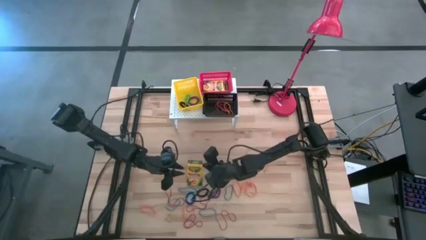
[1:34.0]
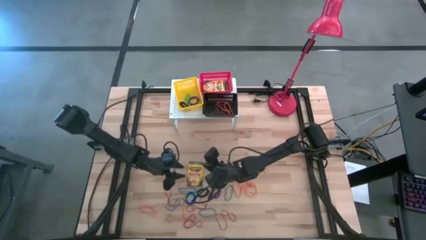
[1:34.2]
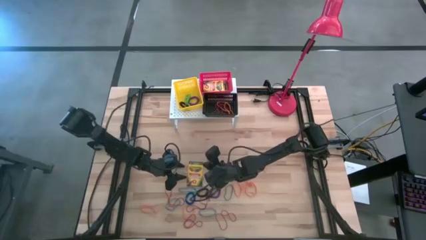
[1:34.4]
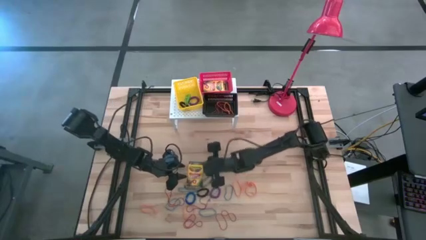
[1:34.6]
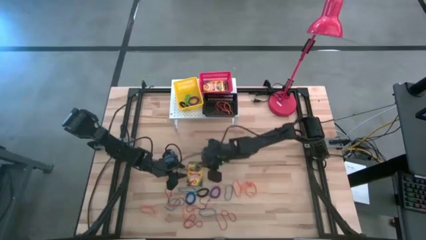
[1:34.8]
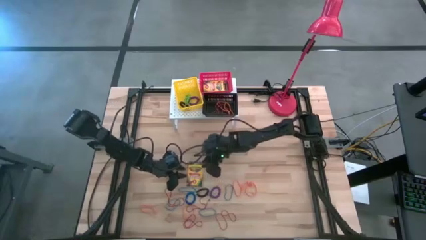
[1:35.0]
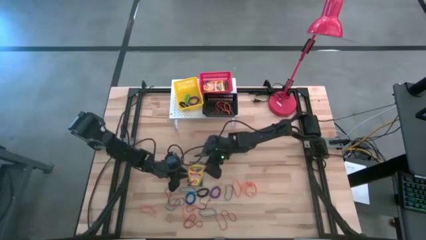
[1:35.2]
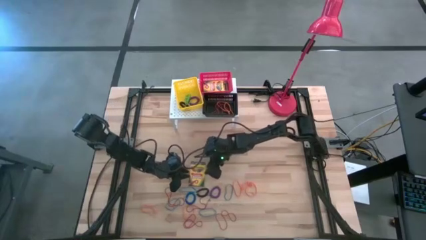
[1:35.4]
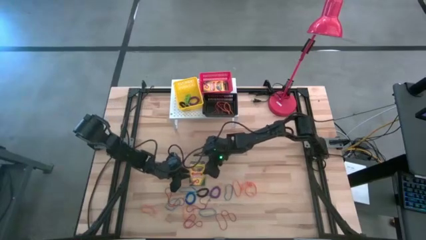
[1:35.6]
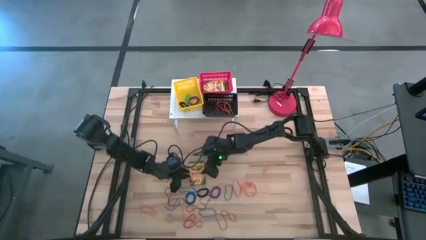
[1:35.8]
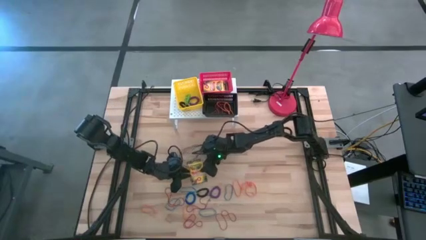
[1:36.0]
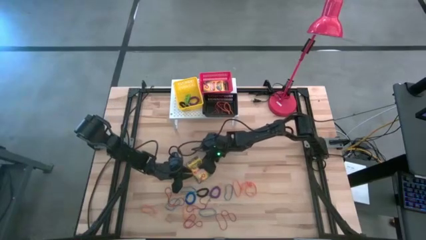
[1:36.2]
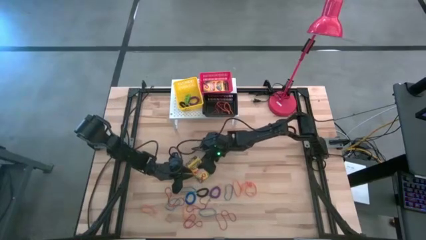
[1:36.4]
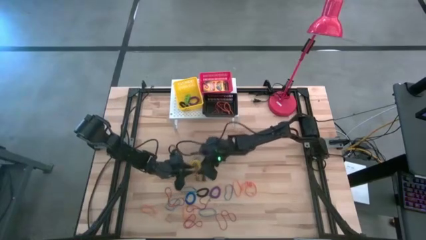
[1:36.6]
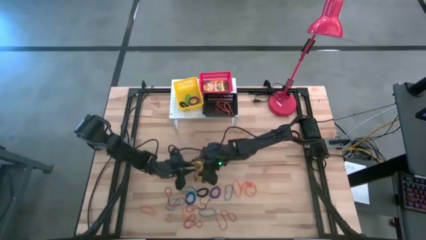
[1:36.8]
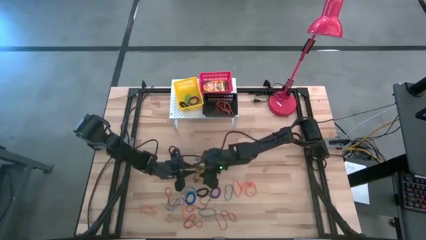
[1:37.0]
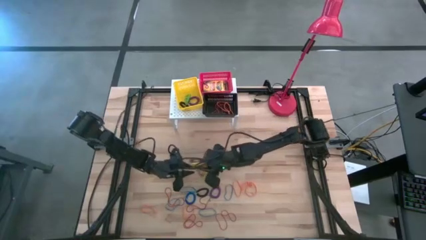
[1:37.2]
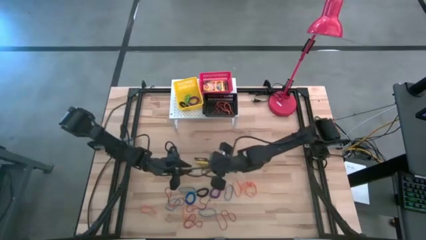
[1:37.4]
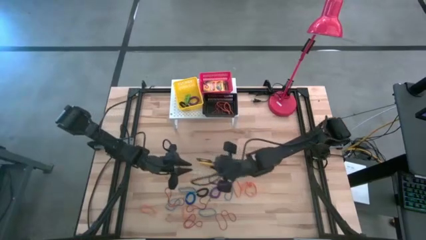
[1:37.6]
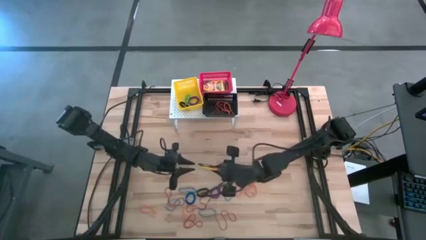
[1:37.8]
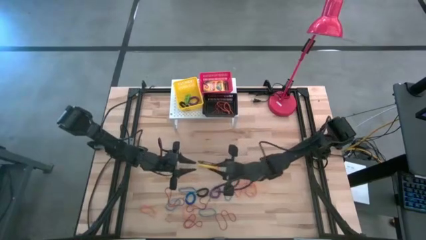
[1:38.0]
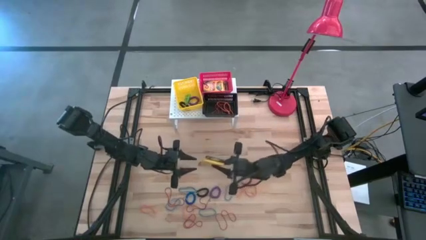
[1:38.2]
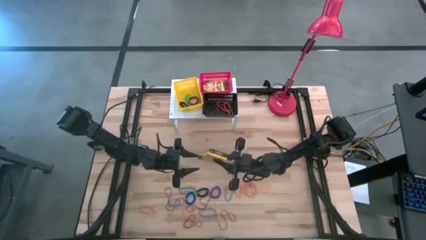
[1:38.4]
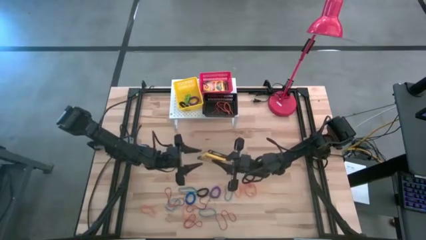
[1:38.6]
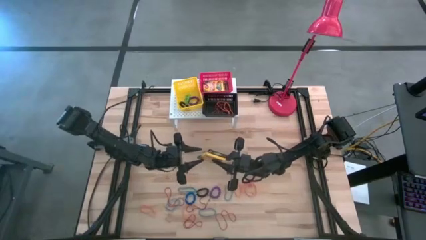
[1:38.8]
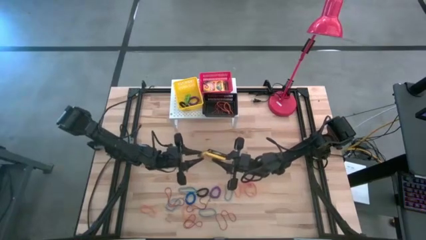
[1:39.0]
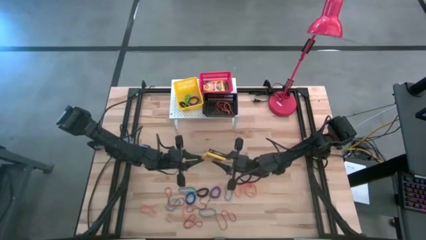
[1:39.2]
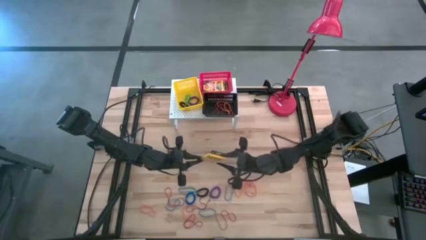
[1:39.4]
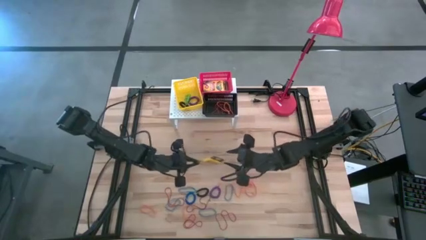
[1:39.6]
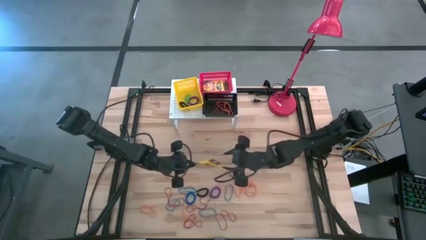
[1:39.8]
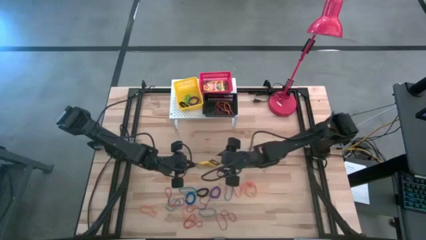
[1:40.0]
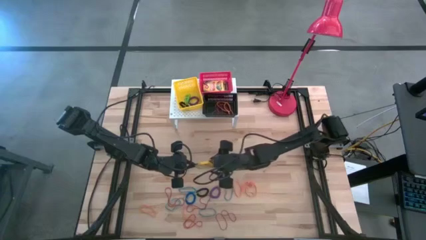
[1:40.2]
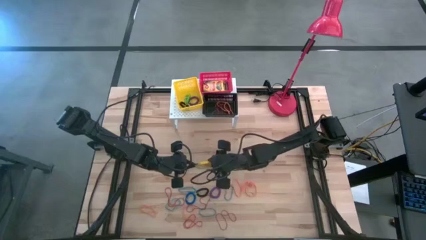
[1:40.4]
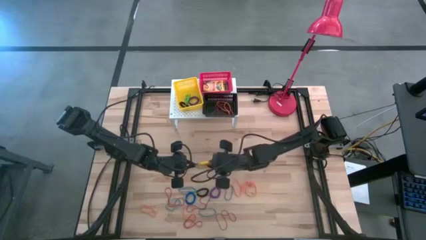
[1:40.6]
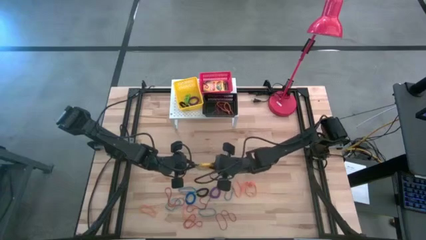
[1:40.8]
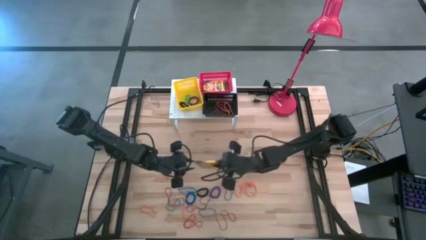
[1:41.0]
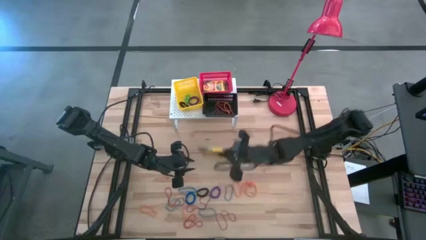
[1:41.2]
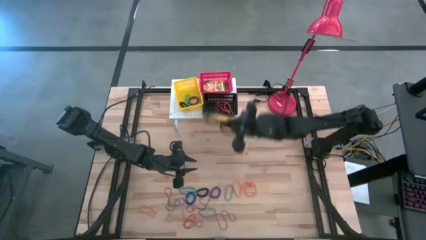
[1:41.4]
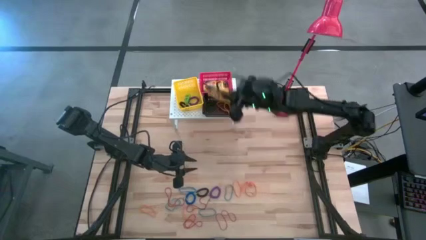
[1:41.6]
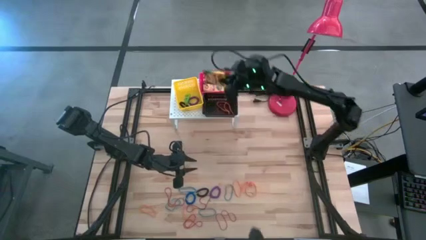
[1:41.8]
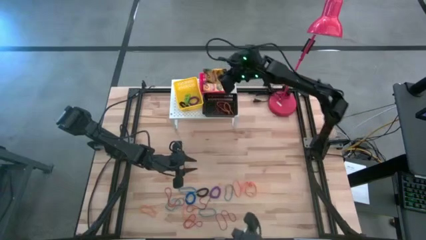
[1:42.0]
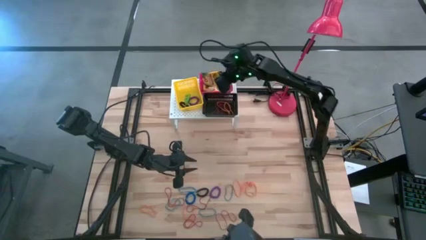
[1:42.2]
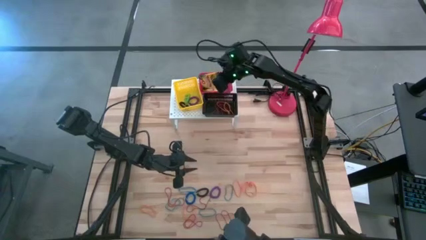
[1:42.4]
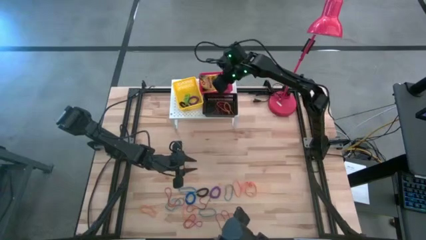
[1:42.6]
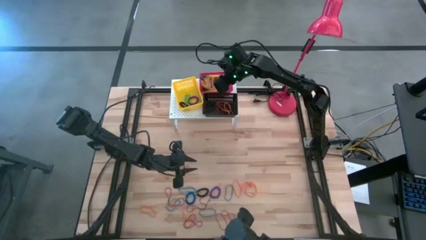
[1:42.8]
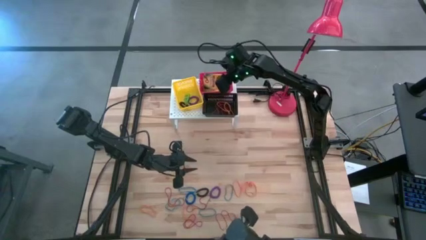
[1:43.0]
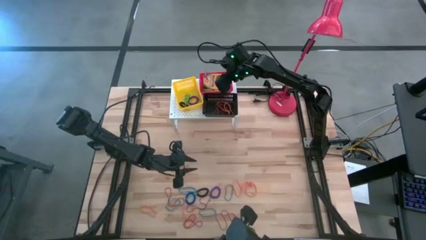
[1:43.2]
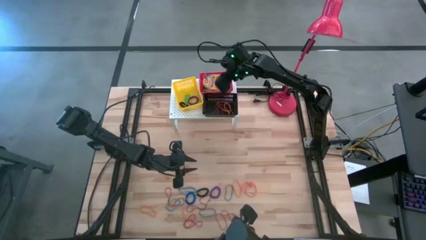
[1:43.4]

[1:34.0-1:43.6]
Task: Pick & Place Office Desk Supplies
Put the yellow crayon box into the red bin on the shelf

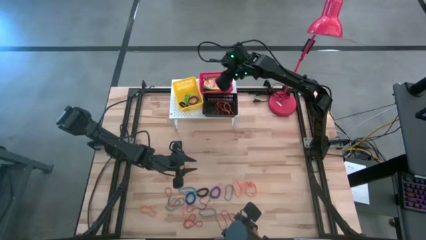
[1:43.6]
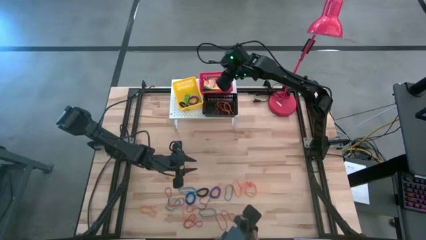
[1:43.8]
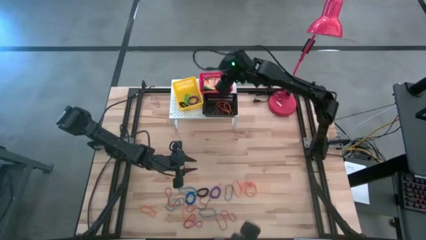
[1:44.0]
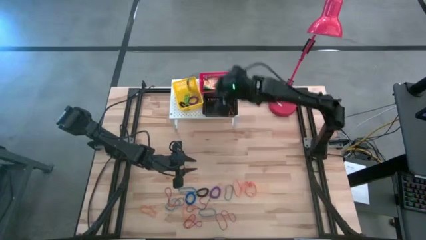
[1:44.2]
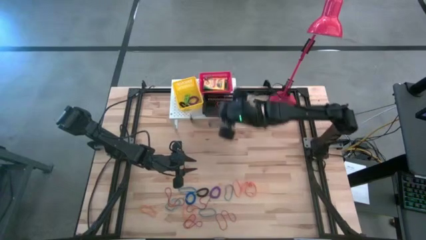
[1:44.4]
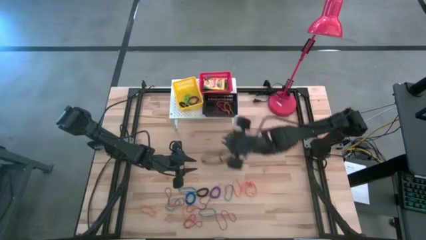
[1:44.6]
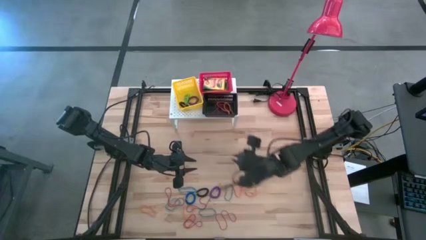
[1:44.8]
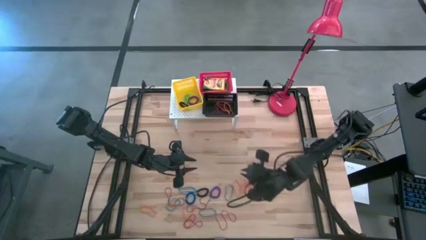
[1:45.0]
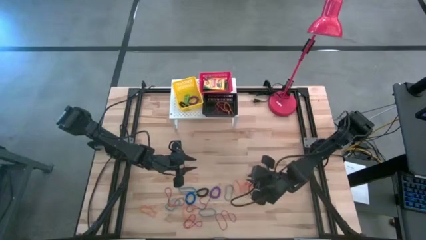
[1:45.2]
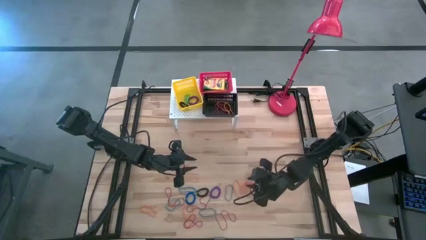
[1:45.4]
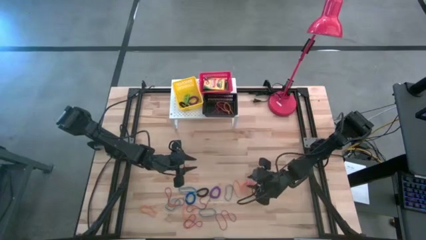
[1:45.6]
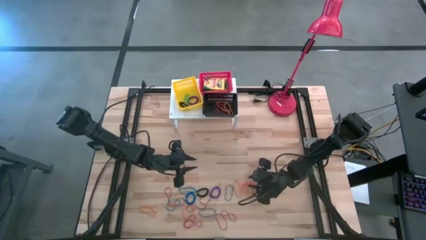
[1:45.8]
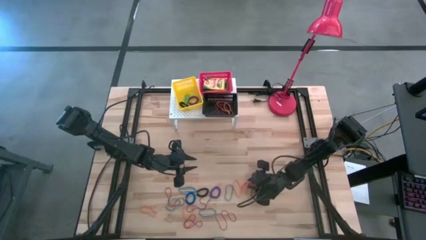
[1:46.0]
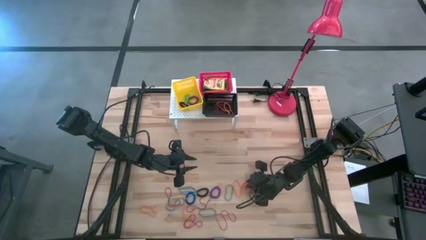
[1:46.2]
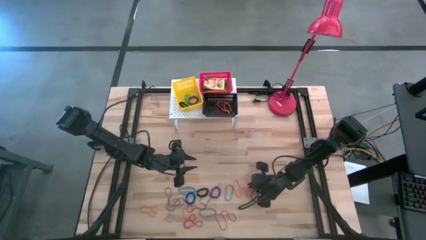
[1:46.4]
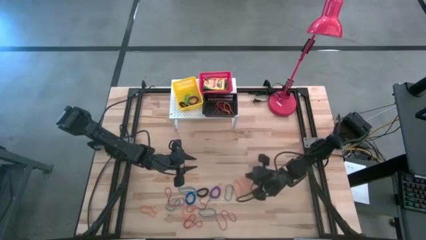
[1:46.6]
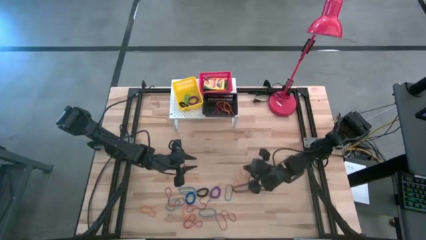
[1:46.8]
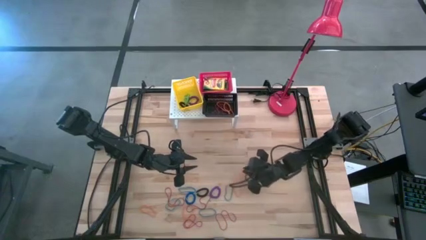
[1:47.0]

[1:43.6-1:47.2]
Put the orange rubber band into the black bin on the shelf

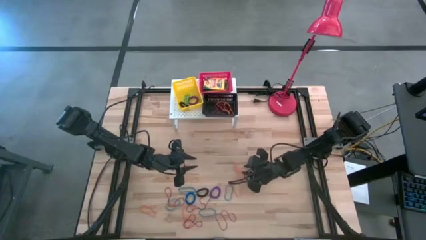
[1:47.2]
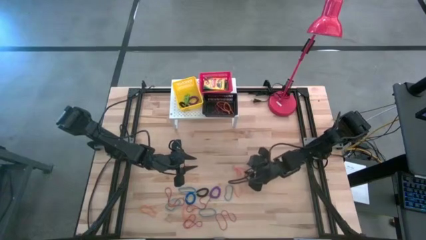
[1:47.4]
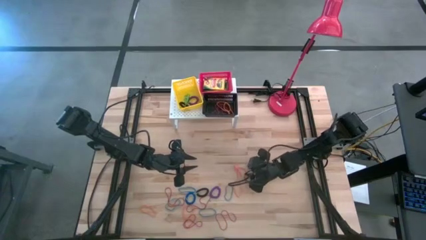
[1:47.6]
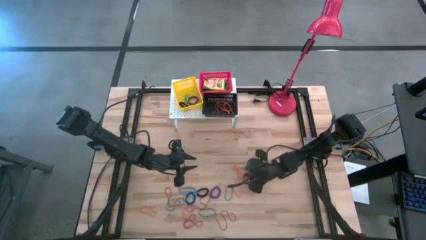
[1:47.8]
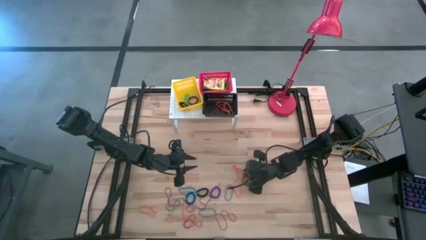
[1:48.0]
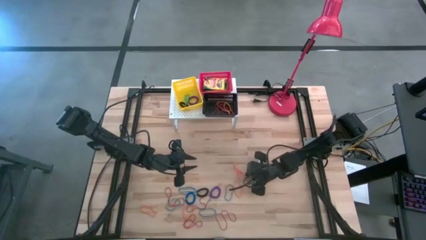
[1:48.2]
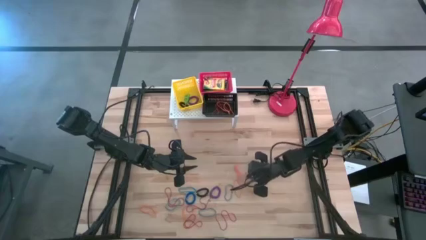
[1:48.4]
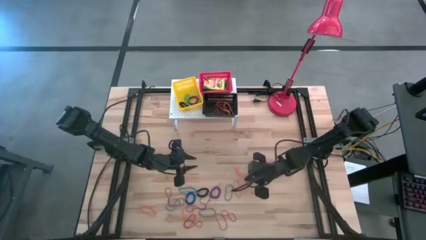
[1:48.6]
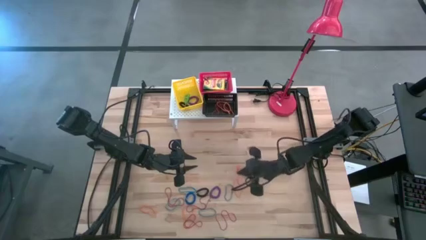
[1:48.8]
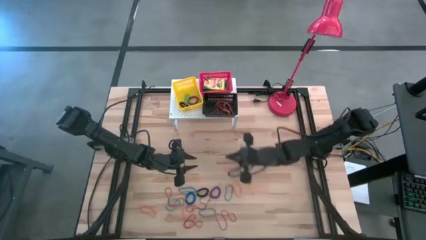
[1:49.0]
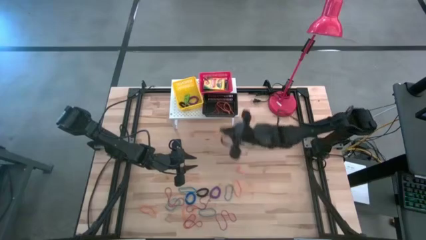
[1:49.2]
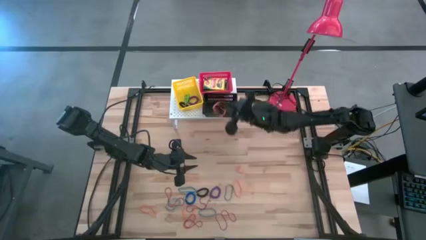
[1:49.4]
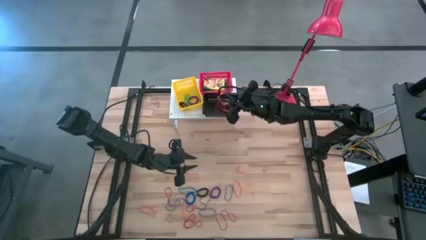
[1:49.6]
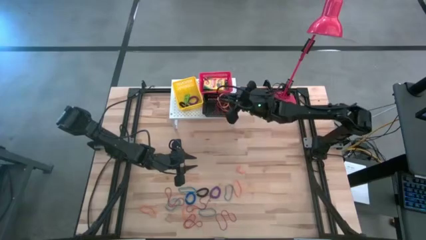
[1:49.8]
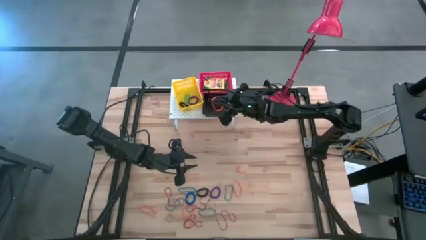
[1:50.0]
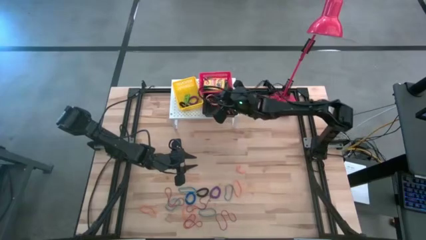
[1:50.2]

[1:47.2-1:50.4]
Put the orange rubber band into the black bin on the shelf

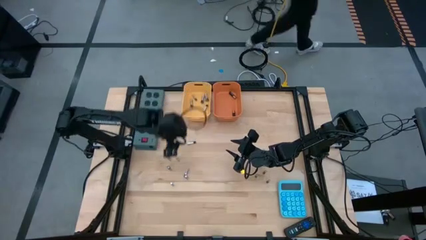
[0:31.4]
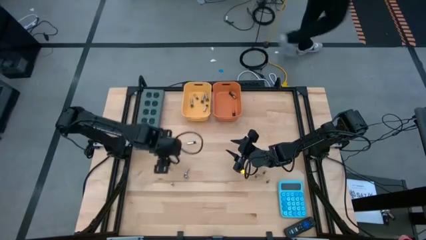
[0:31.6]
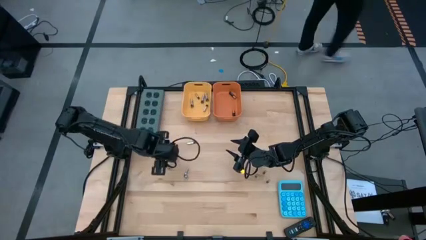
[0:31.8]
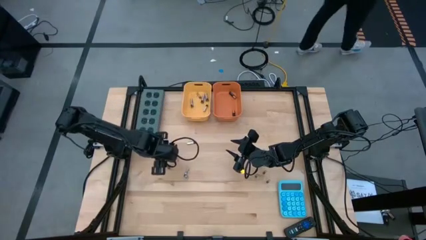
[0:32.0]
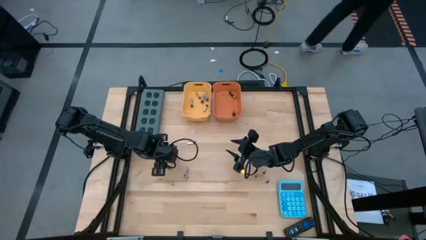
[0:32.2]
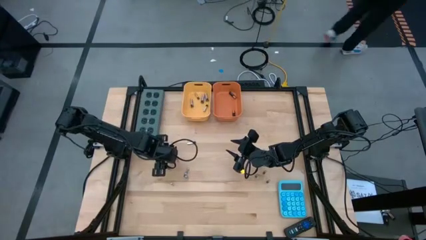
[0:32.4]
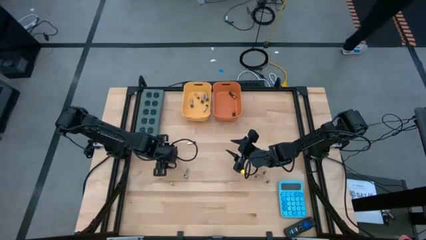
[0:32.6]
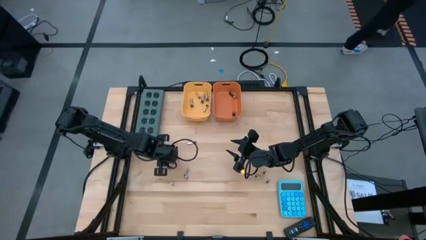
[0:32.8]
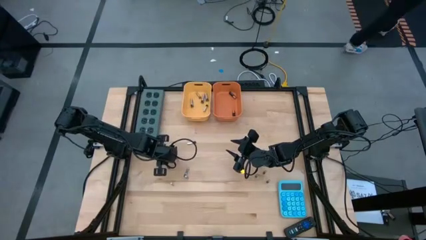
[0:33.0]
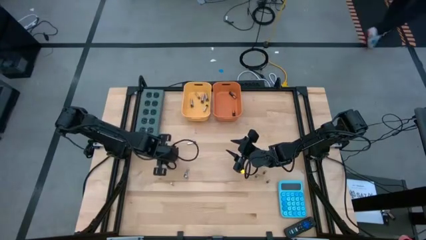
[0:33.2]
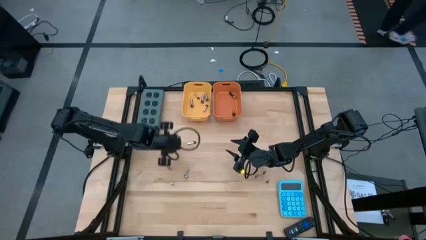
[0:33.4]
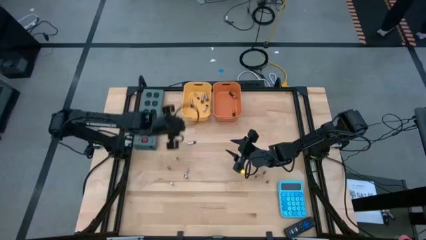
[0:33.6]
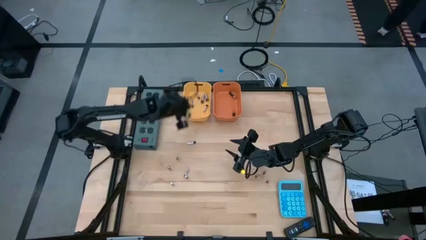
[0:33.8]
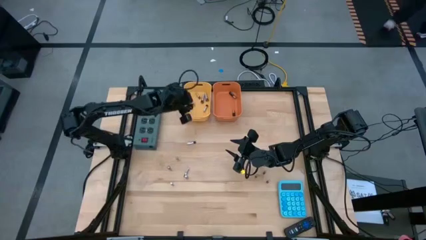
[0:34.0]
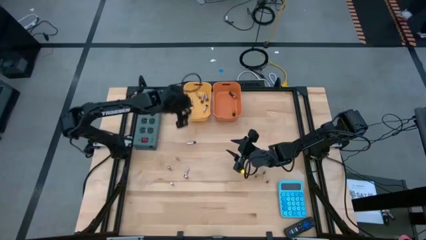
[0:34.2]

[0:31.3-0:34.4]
Task: Sort batteries
Put the silver battery into the yellow bin
